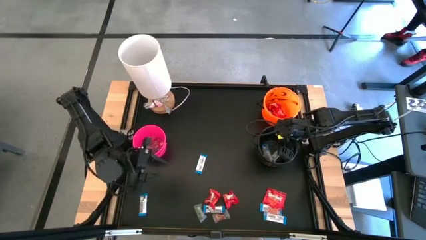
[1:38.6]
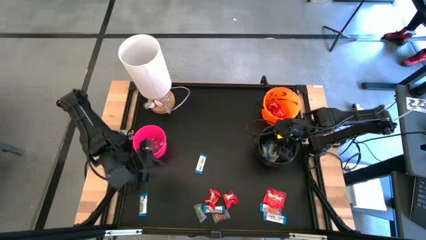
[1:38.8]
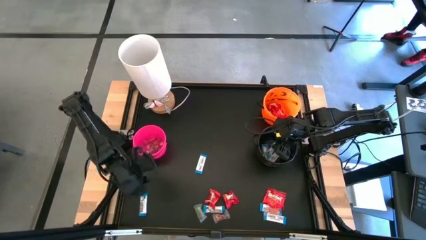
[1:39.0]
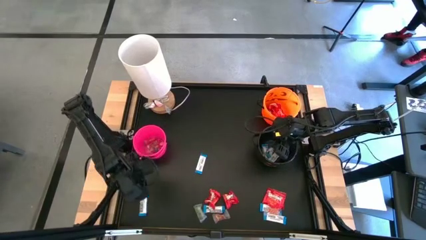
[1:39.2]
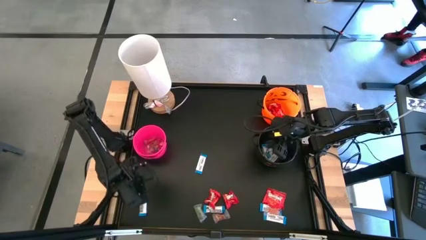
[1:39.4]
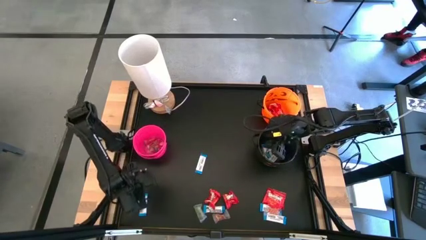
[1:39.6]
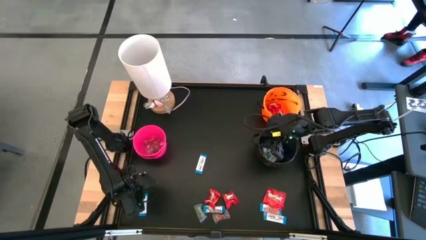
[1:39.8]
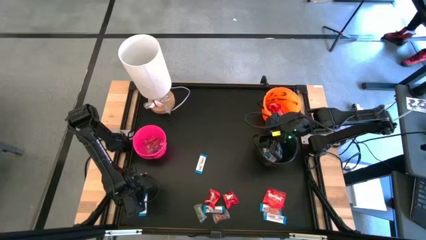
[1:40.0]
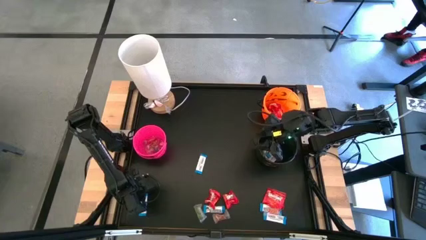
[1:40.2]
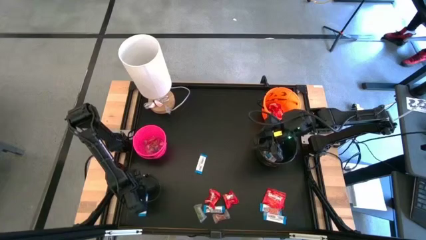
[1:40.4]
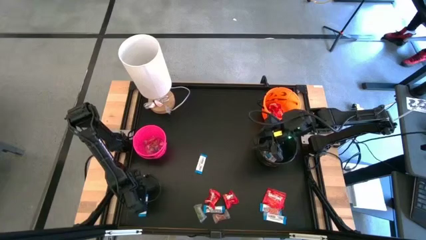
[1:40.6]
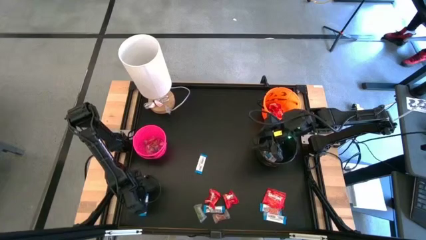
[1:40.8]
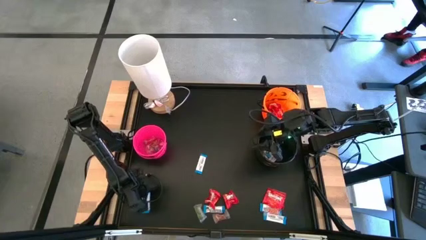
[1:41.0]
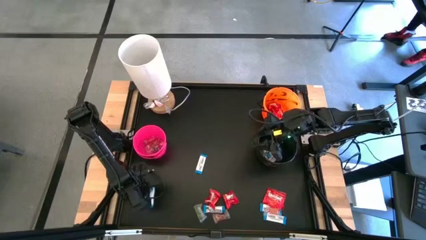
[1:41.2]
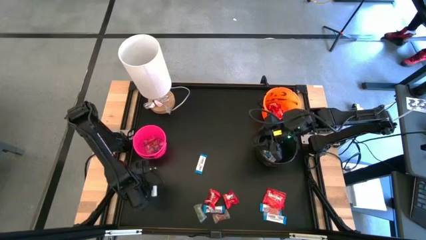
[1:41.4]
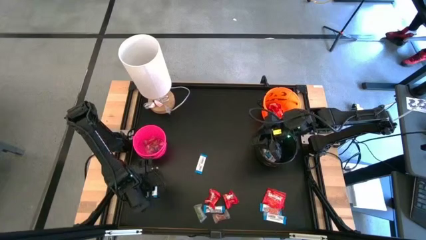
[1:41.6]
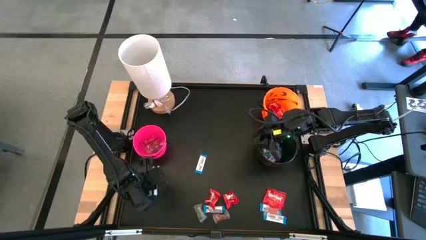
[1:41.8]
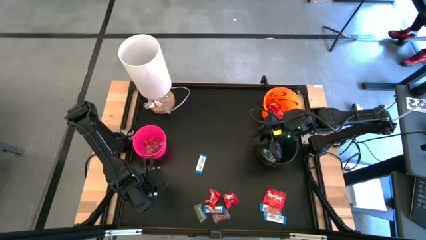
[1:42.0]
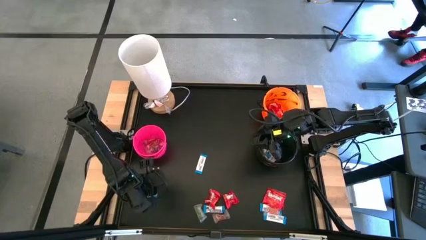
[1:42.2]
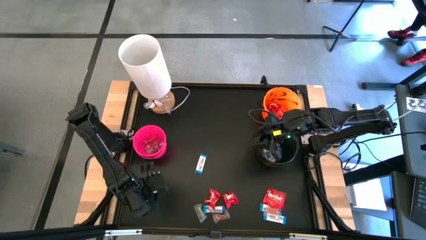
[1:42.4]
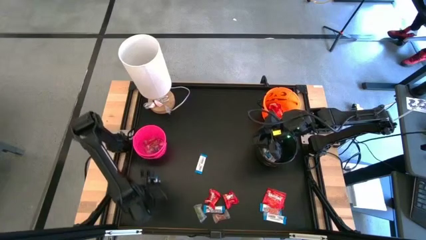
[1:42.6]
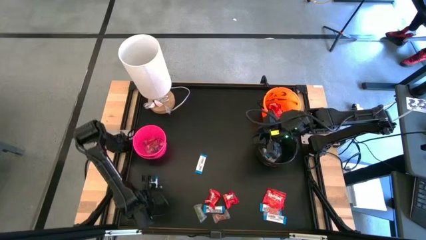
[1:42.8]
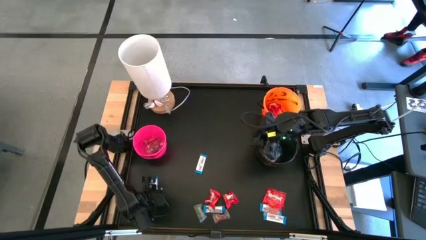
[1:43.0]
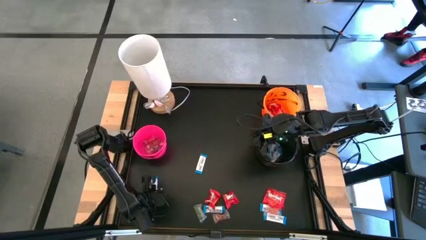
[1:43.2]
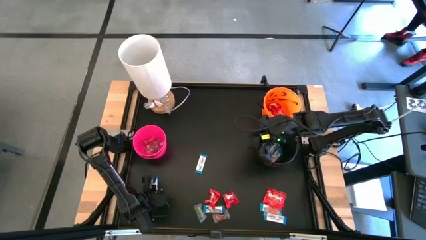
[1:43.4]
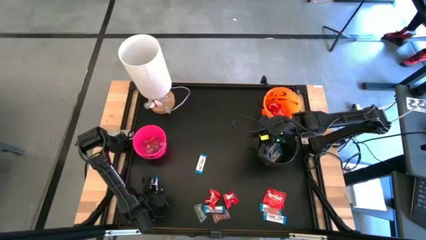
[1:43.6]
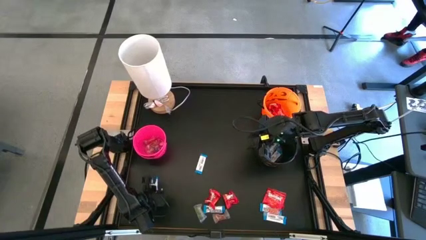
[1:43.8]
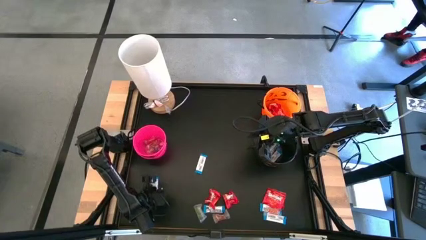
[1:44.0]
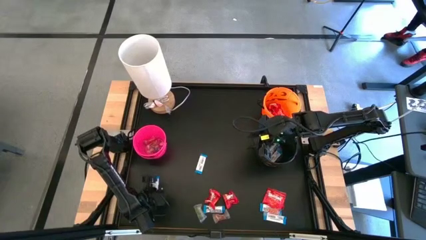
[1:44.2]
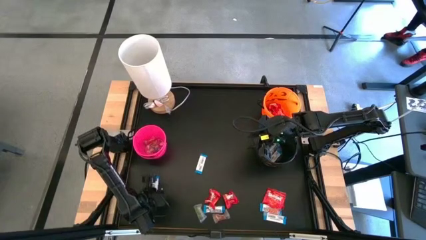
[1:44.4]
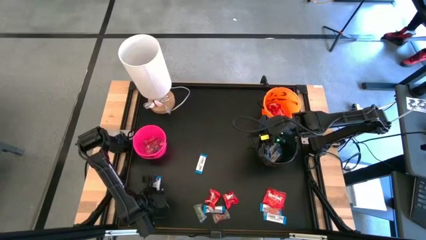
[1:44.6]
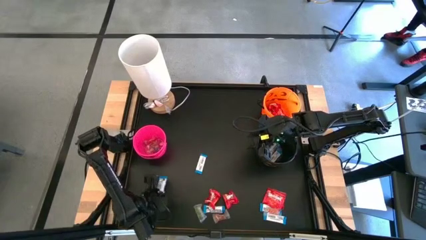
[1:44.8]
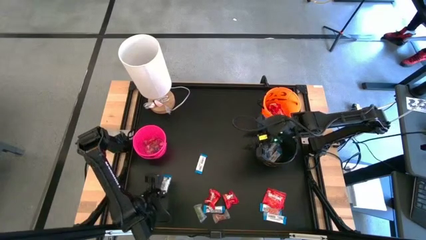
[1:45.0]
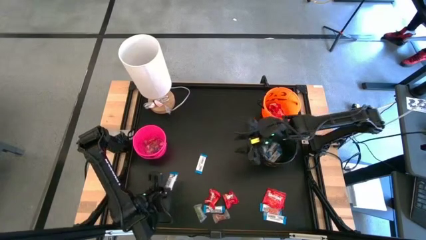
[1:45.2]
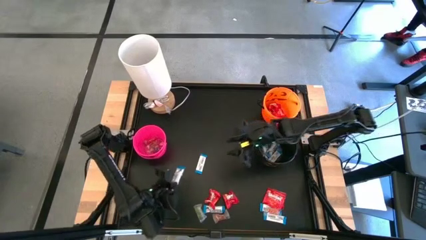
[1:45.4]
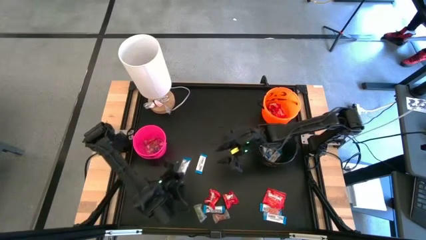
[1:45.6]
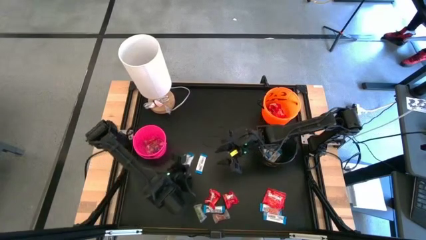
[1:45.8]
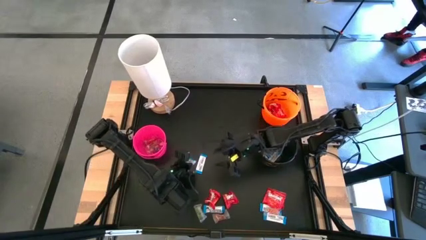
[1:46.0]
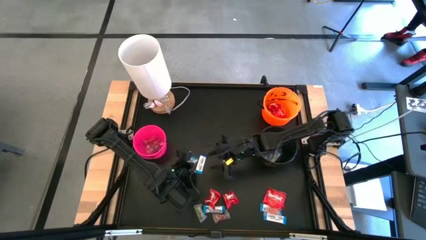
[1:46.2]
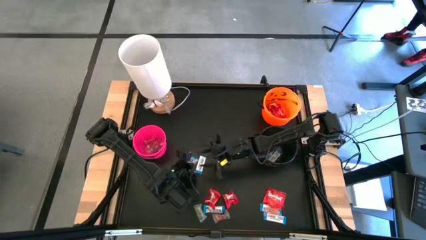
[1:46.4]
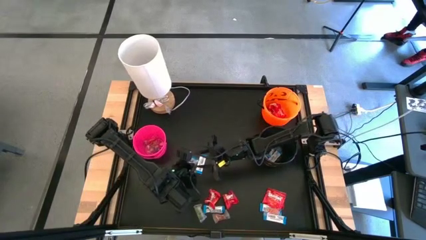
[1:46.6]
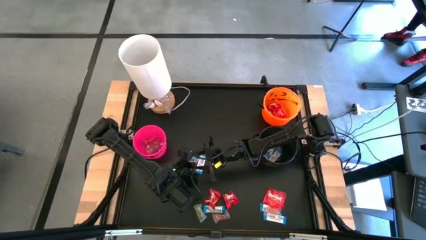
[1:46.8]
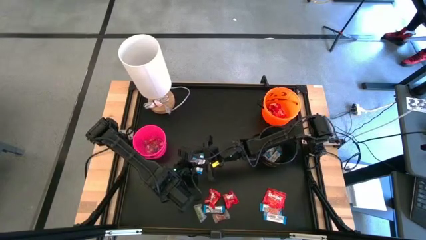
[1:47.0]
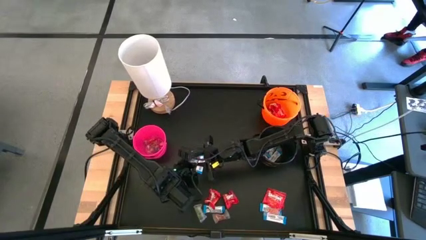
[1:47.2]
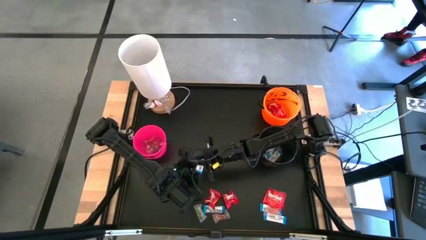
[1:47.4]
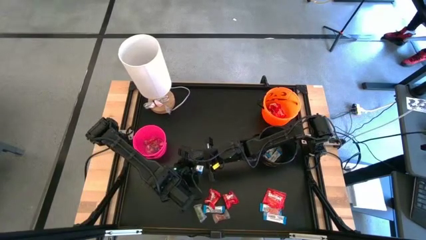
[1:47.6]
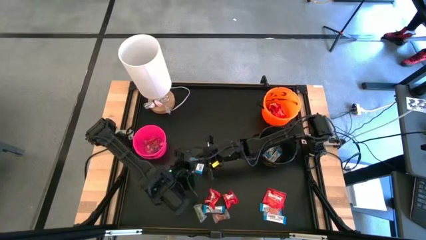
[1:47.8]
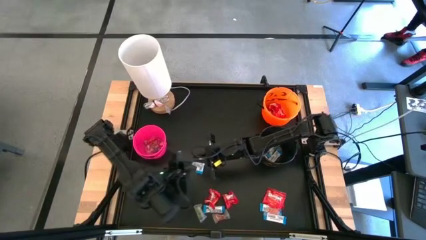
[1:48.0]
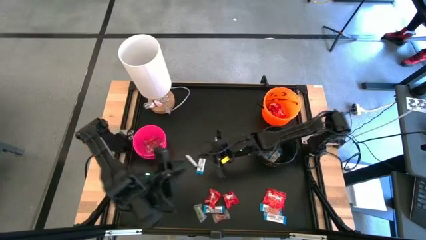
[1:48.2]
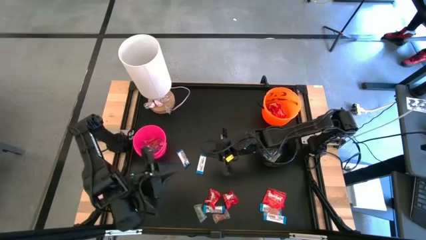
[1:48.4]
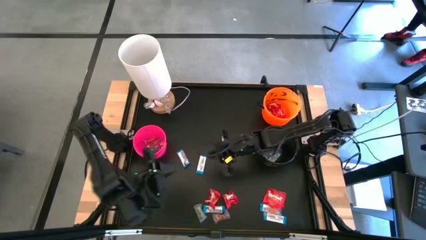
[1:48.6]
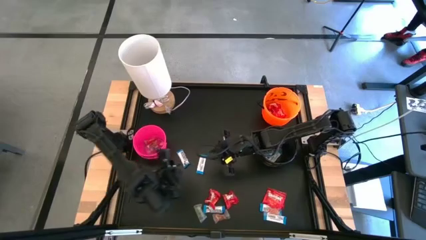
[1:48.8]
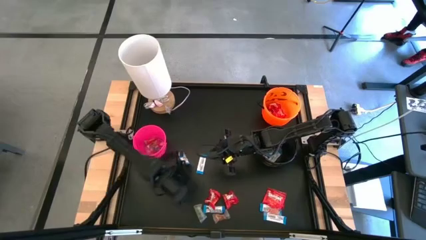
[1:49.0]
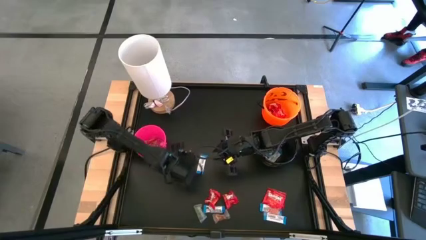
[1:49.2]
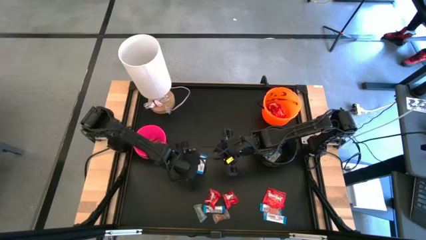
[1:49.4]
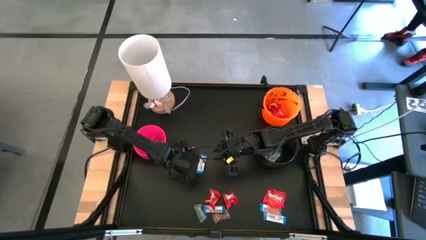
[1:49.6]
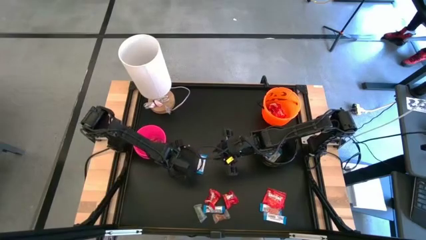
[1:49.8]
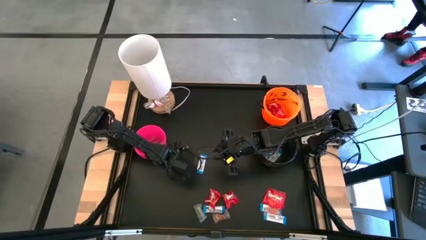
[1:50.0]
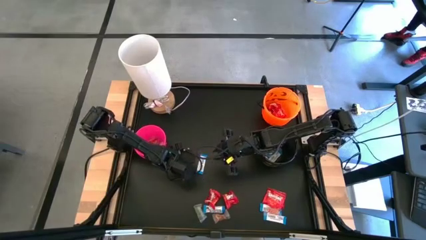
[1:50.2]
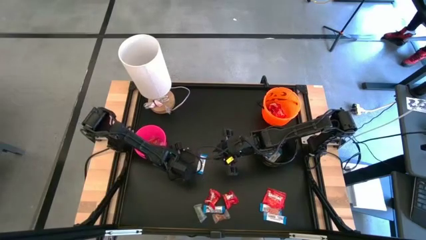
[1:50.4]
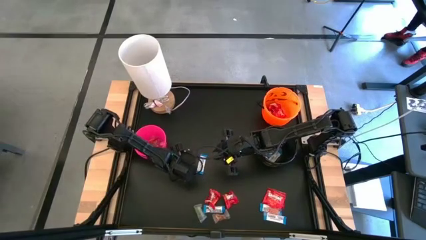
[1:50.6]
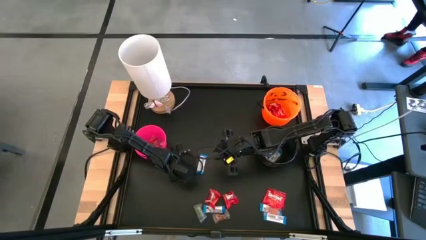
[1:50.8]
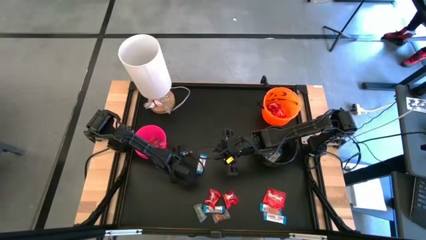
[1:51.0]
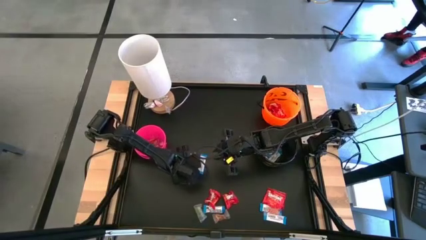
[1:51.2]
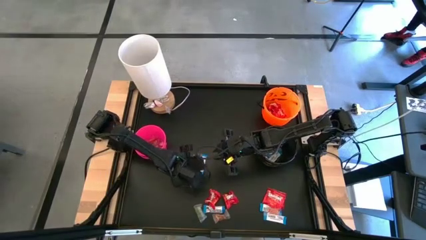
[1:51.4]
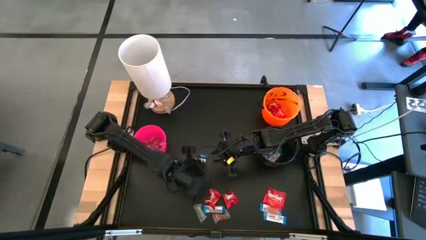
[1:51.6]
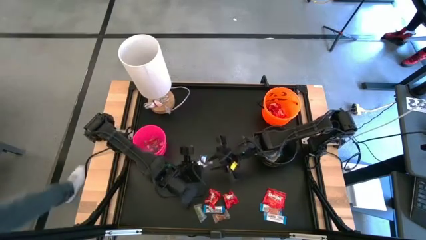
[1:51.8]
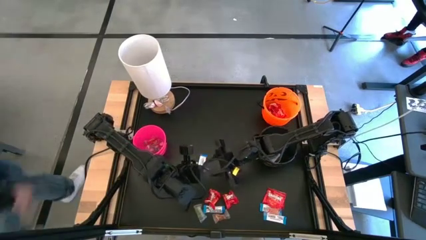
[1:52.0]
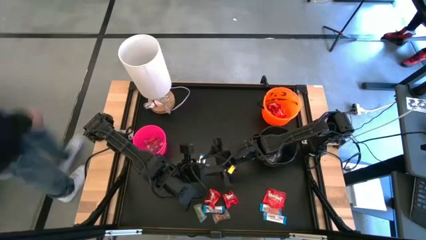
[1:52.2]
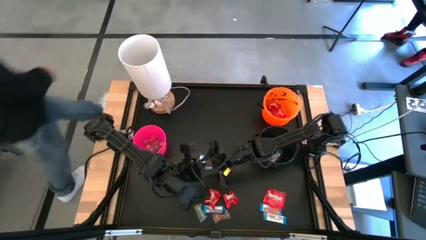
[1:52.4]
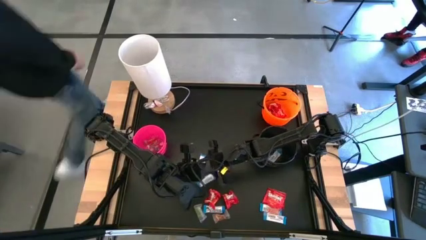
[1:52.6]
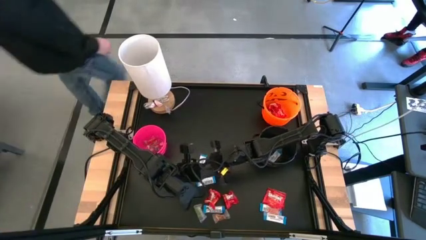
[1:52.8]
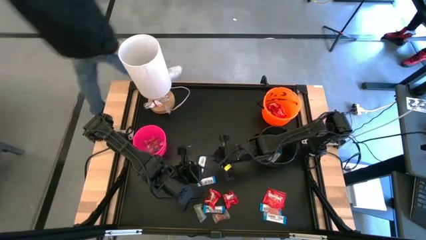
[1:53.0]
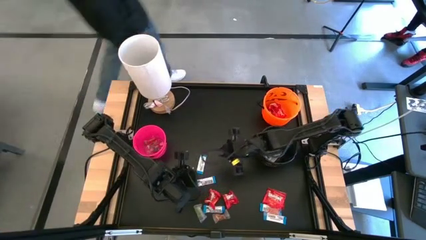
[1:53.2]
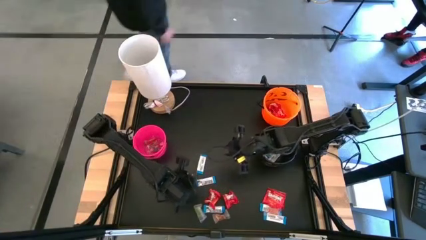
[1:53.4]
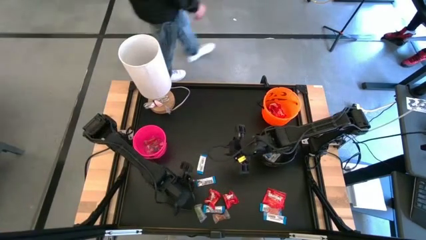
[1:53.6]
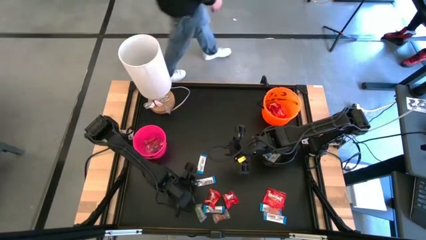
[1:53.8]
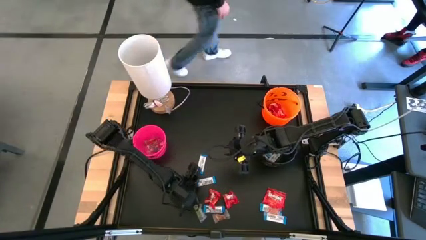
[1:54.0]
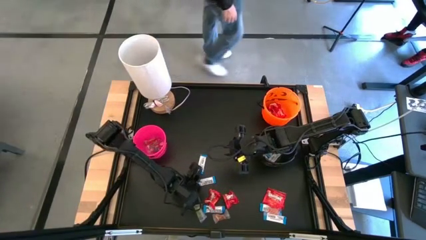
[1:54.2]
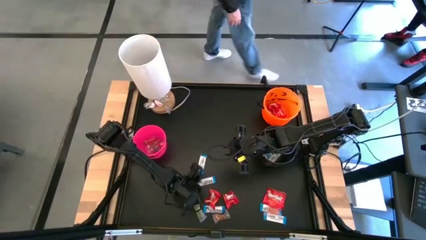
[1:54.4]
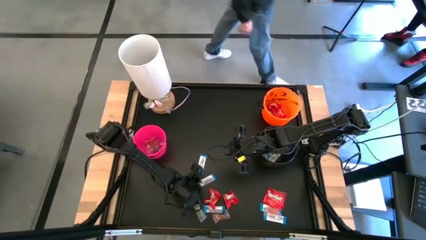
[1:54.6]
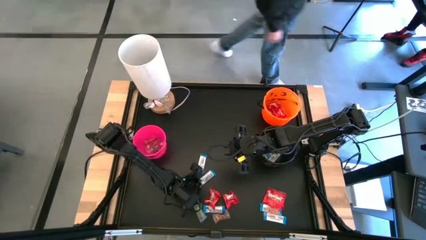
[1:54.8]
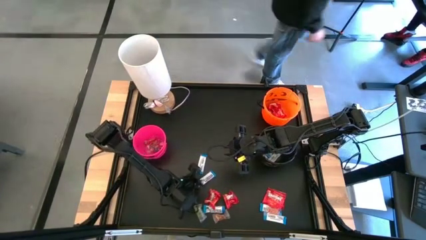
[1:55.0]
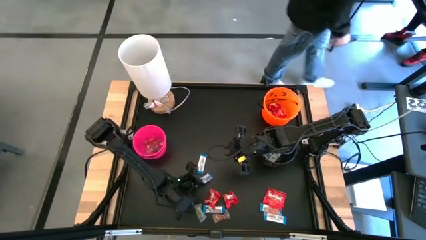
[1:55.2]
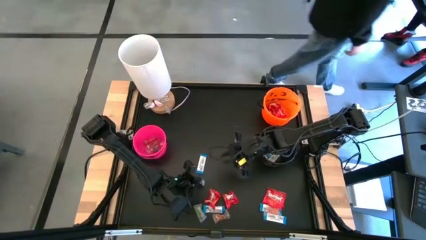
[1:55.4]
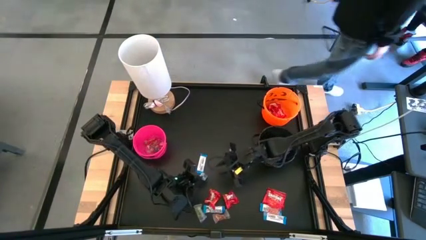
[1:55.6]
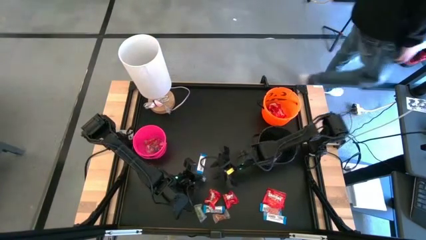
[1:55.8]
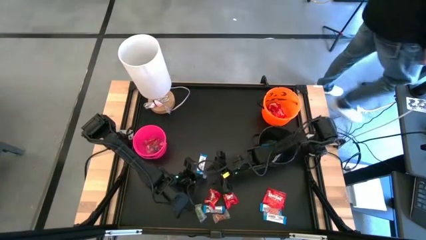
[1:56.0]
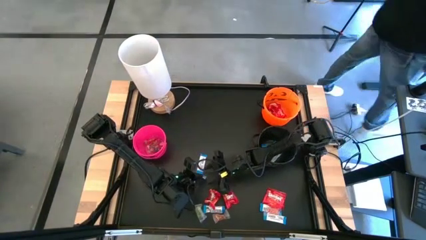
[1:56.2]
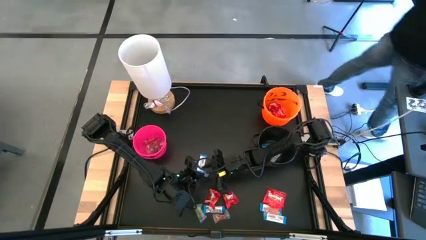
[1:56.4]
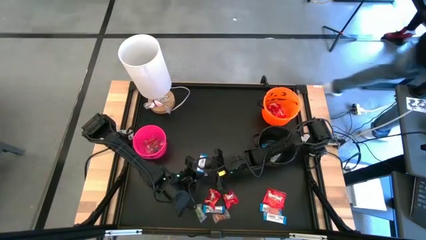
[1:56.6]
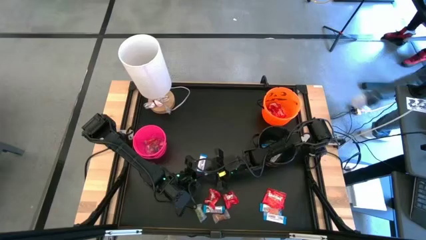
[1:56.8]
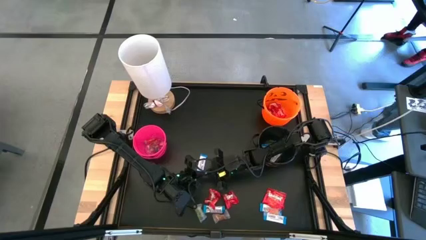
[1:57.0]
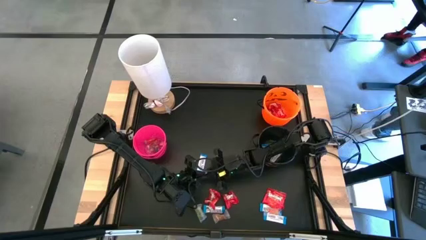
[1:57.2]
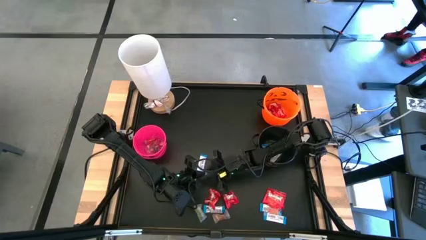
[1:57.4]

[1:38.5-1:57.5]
Task: Sort candy
Put the white chocolate into the black bucket
